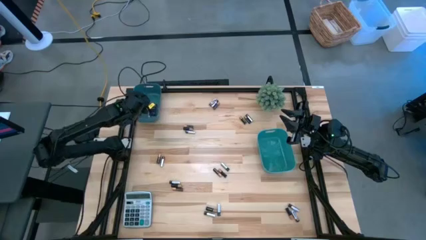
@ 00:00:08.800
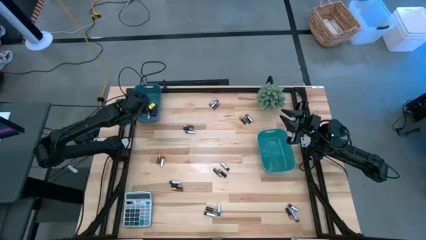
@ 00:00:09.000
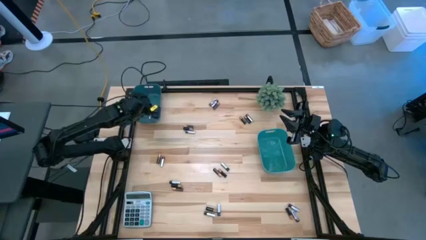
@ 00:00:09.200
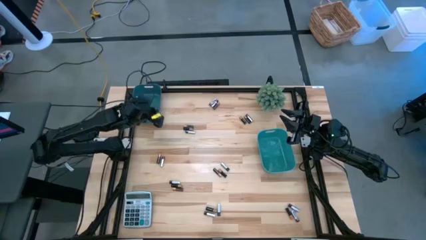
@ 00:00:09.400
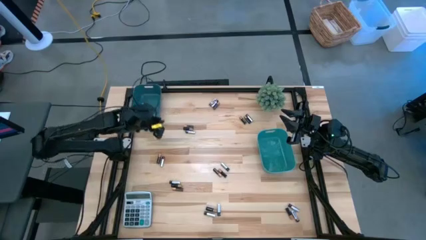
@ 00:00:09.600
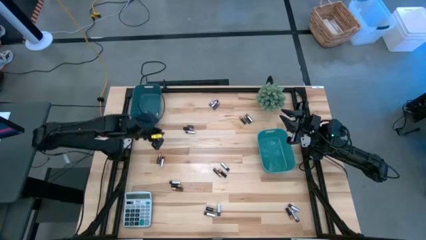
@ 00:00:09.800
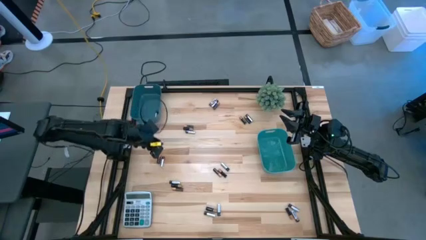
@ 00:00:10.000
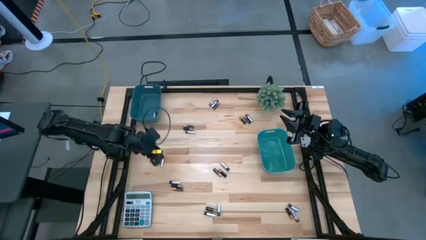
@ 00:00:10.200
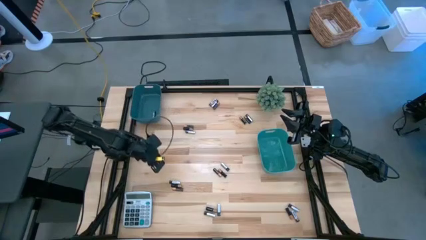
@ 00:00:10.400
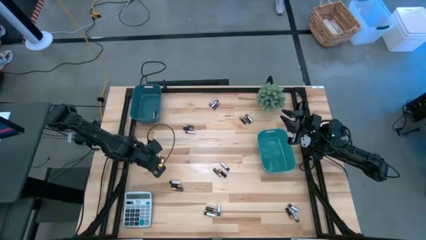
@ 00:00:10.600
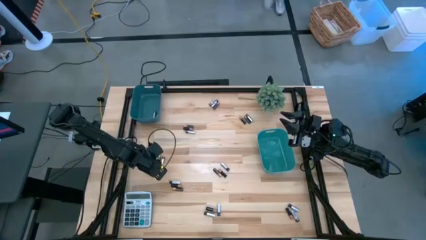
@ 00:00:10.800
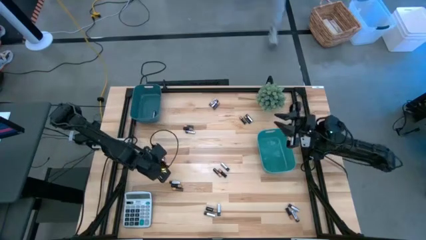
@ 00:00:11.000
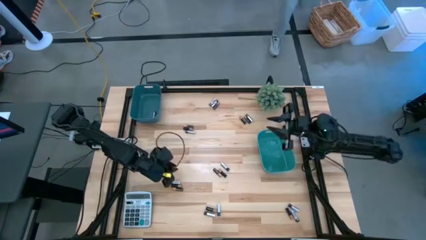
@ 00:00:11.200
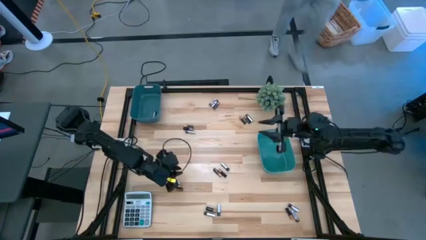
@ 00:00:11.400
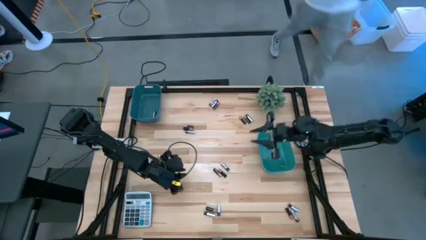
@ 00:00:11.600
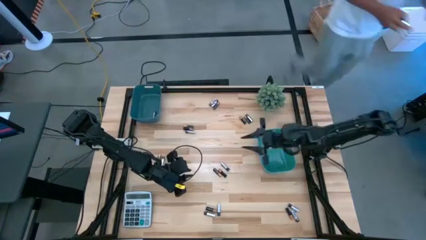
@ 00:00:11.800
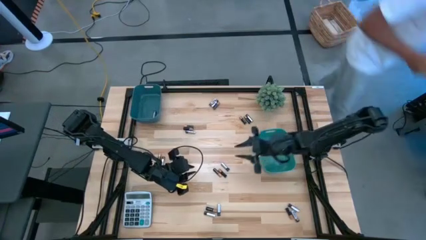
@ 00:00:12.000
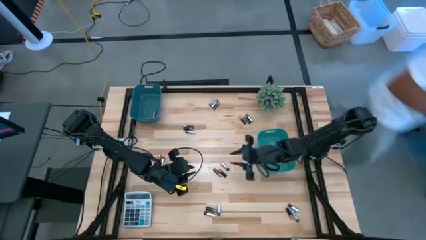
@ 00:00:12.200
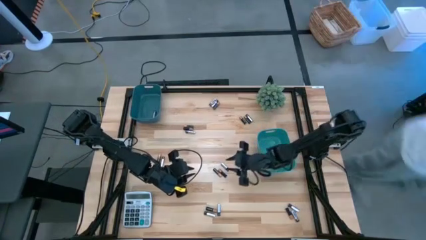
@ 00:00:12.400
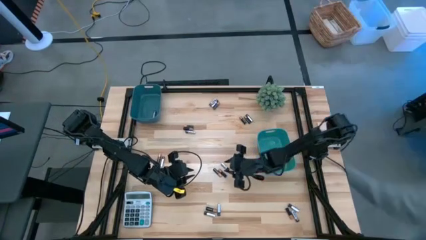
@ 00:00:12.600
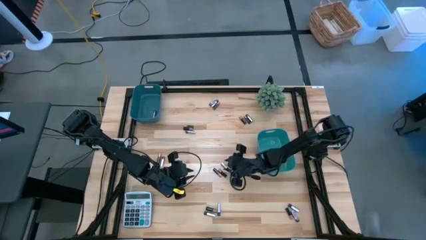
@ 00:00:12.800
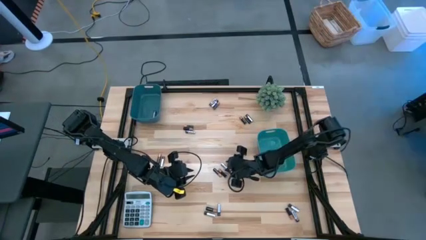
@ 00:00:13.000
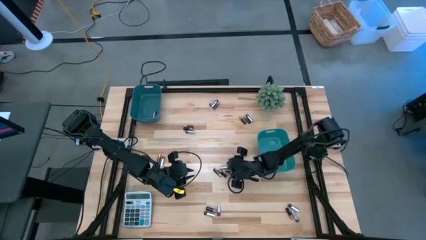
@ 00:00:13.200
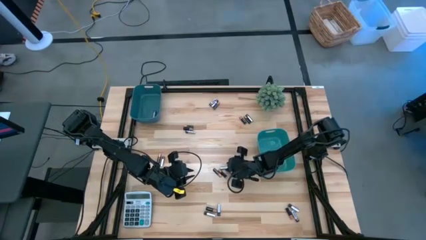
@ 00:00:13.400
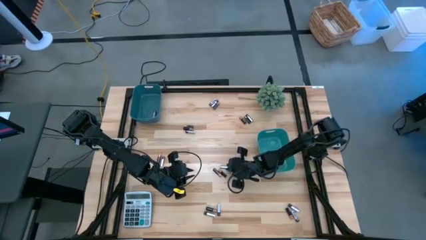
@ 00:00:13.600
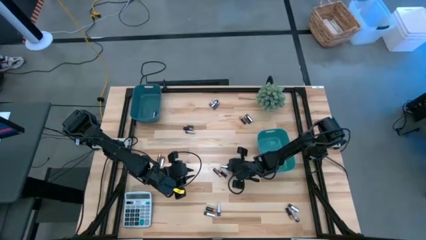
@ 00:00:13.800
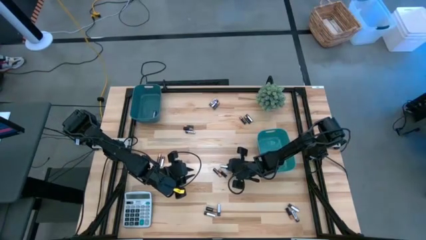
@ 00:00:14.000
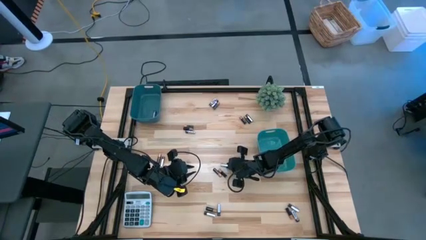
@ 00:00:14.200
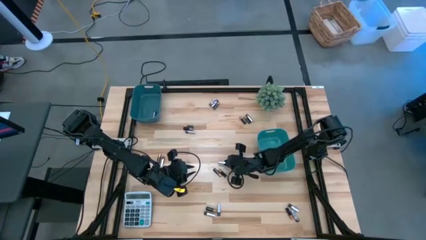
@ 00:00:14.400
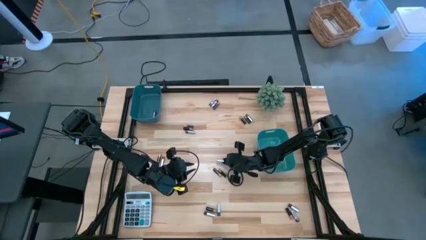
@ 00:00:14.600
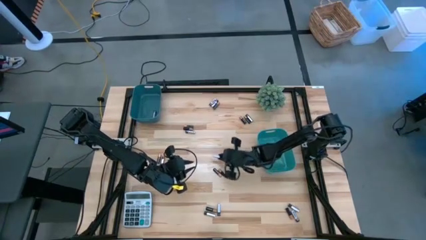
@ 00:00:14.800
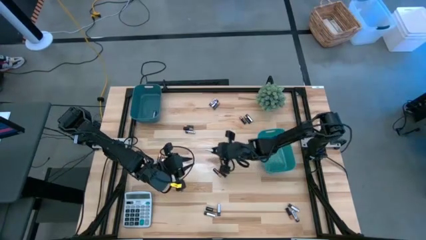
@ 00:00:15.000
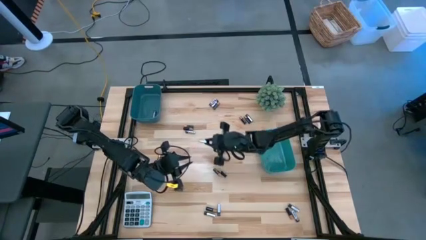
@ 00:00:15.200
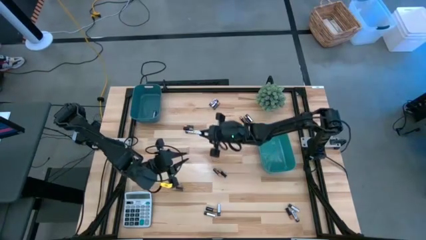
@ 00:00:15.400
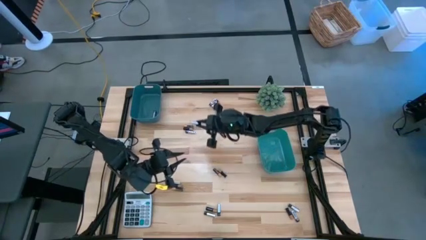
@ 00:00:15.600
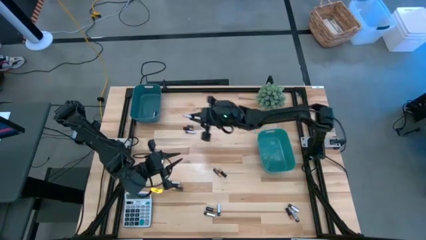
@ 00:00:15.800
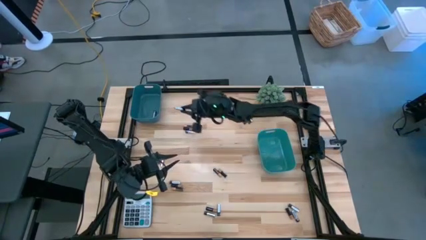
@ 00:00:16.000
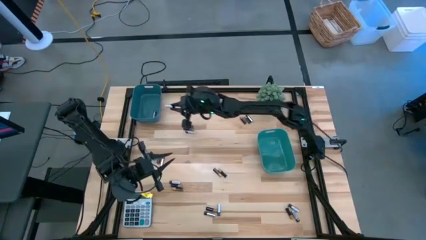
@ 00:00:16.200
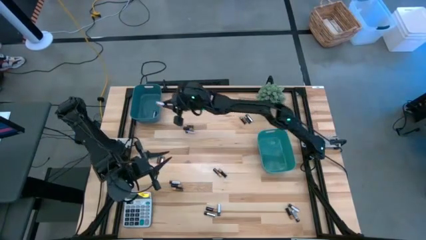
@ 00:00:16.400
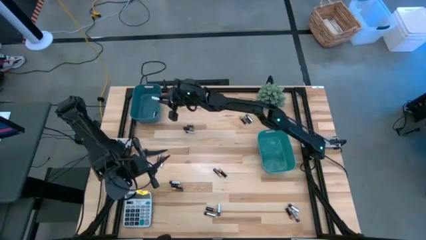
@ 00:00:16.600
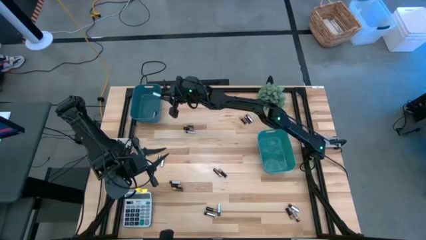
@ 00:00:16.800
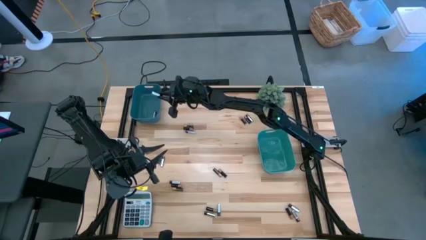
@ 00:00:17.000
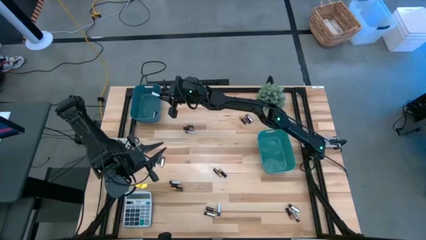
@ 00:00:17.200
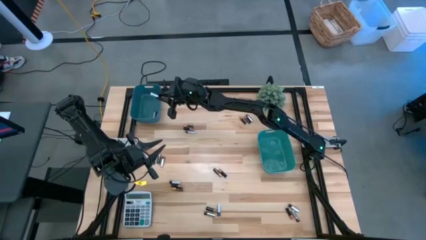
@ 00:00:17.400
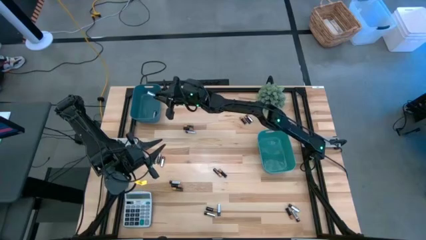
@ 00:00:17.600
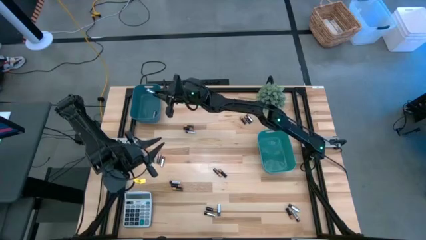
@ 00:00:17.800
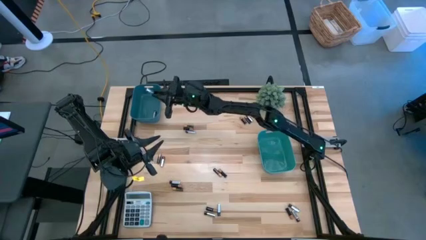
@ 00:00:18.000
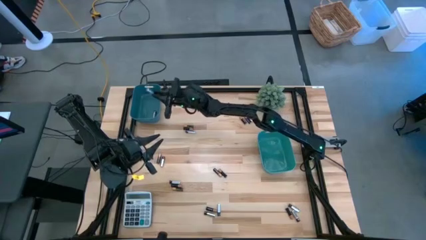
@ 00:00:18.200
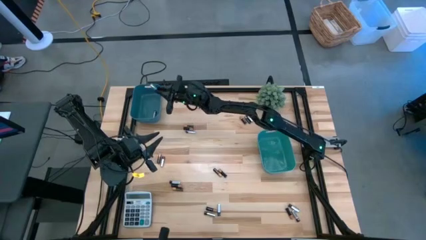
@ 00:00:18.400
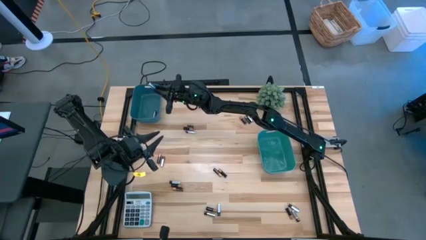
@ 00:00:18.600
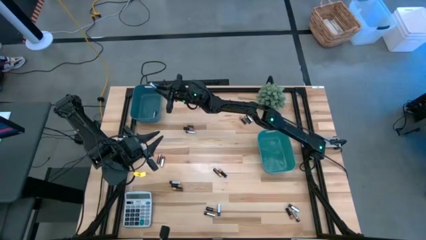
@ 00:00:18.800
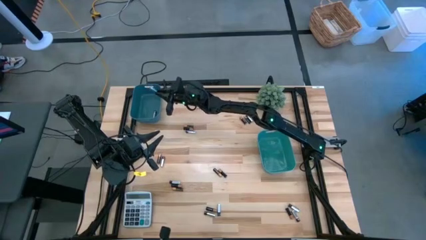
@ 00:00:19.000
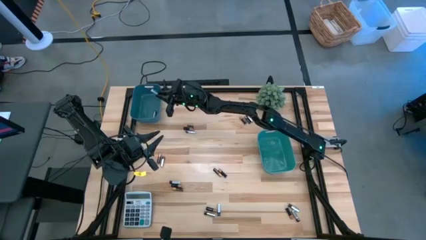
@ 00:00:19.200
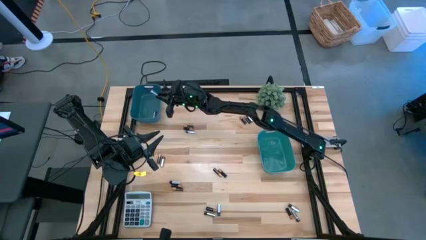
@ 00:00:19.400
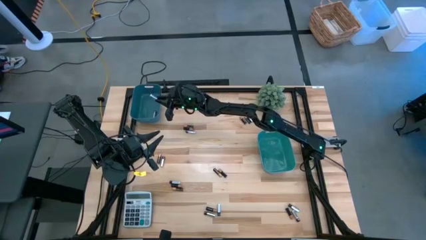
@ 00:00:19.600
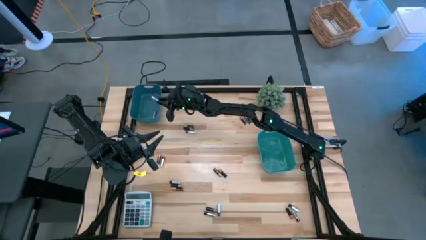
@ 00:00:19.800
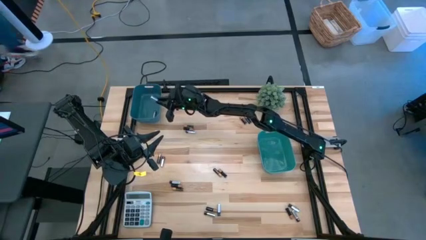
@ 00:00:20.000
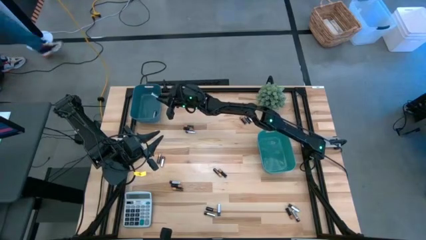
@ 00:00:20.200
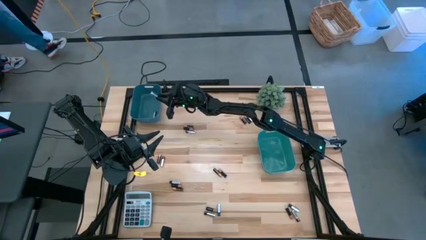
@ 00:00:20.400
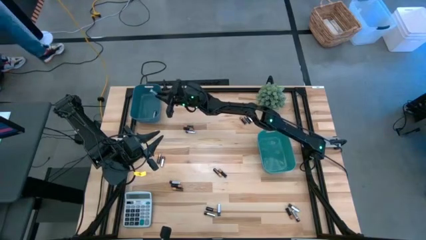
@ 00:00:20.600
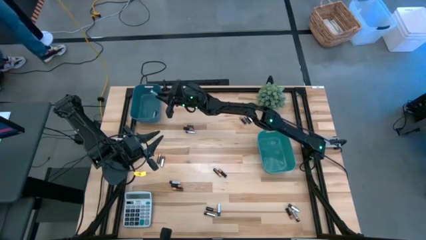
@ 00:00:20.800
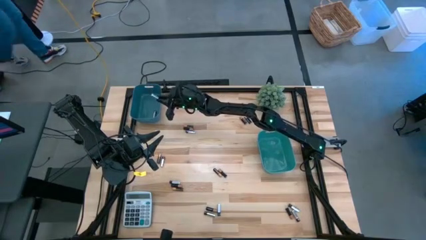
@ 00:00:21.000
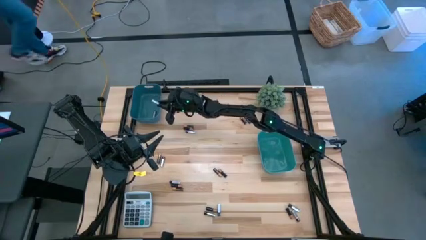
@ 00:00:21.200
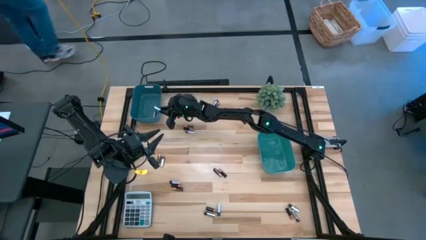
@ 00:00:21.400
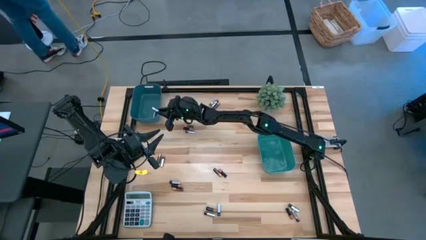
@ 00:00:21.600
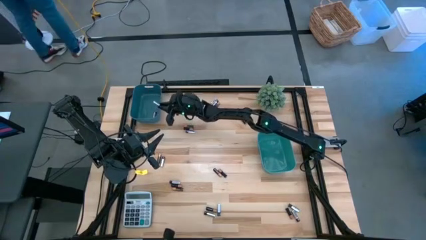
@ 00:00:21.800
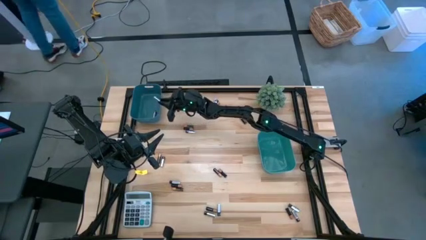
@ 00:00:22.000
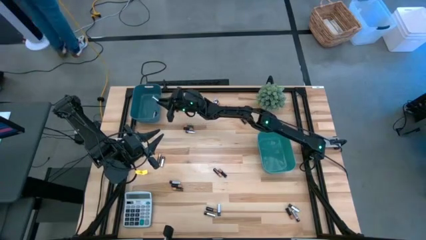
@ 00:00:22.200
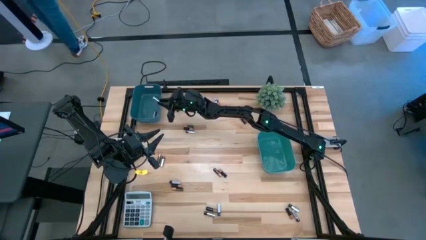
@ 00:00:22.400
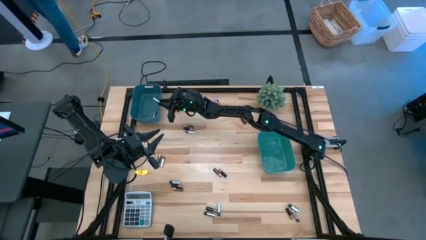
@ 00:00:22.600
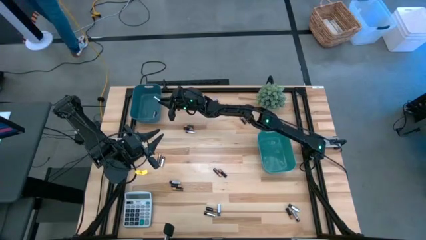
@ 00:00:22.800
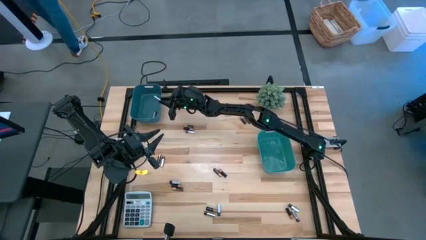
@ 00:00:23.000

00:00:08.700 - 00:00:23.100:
Task: Sort batteries
Put the black-silver battery into the blue bin
